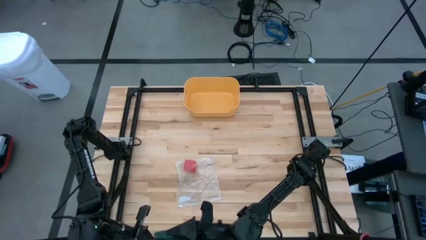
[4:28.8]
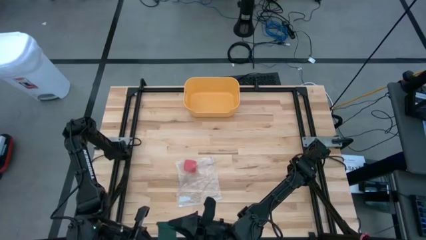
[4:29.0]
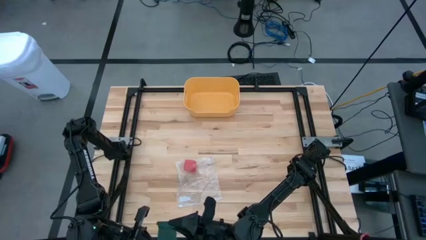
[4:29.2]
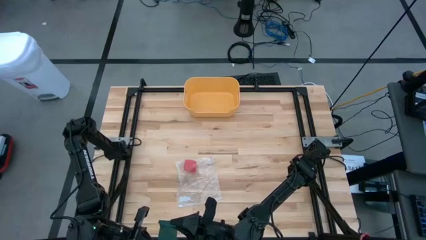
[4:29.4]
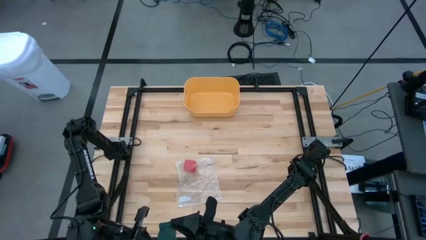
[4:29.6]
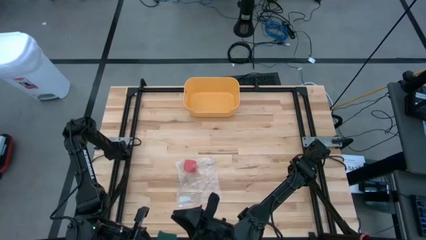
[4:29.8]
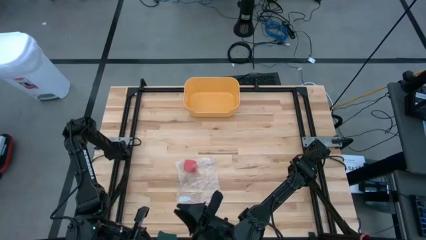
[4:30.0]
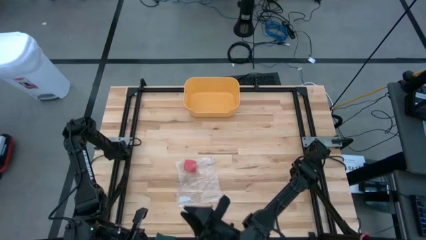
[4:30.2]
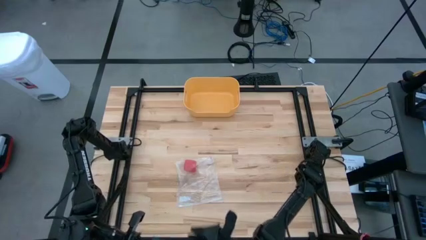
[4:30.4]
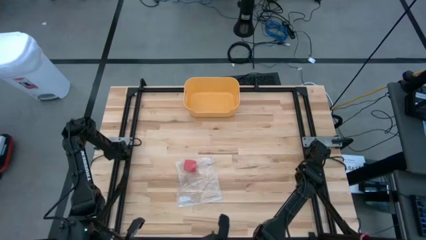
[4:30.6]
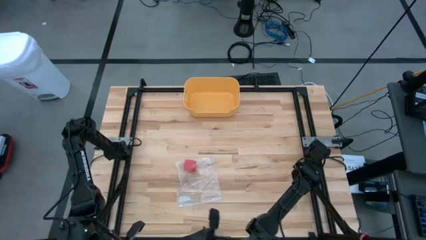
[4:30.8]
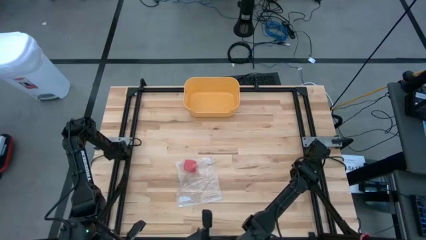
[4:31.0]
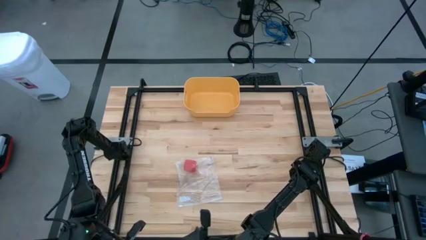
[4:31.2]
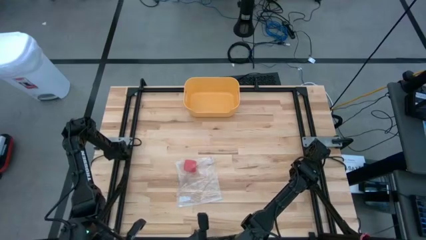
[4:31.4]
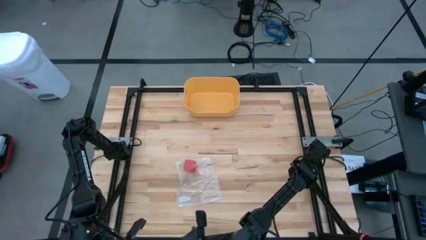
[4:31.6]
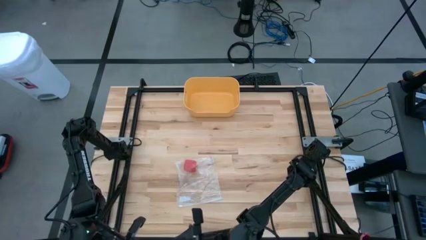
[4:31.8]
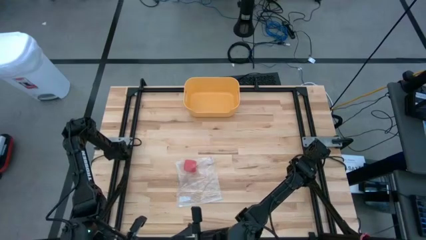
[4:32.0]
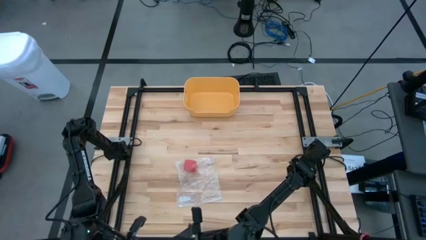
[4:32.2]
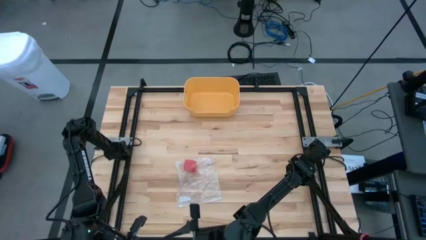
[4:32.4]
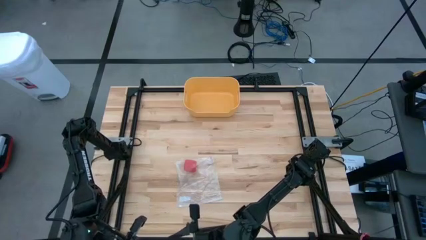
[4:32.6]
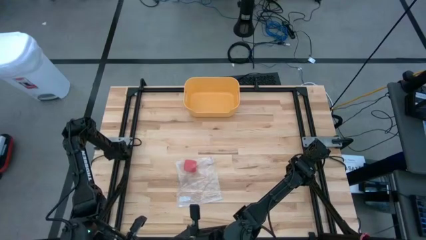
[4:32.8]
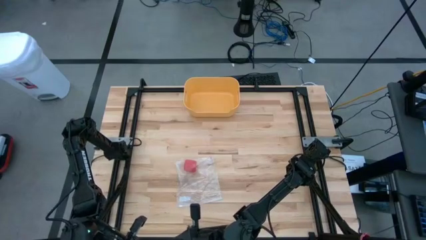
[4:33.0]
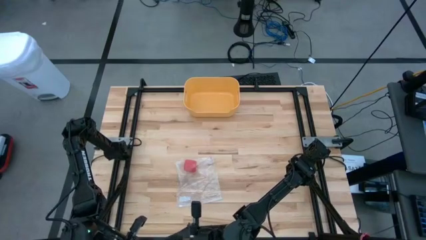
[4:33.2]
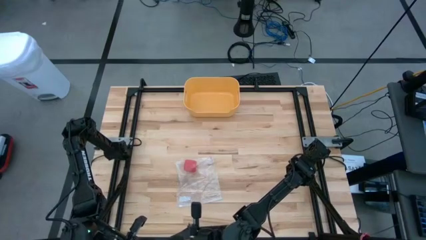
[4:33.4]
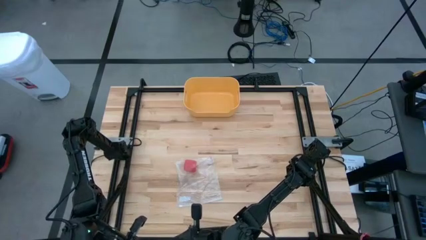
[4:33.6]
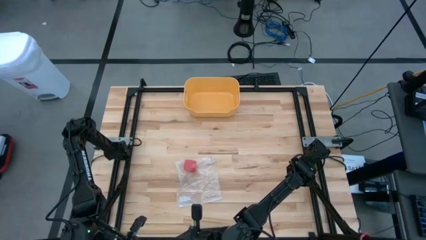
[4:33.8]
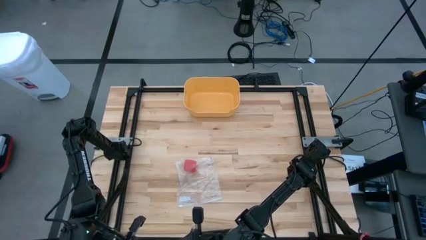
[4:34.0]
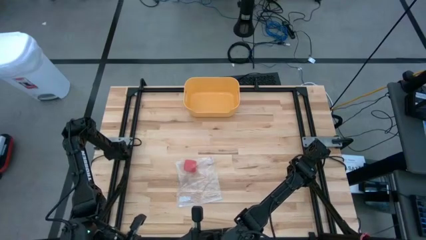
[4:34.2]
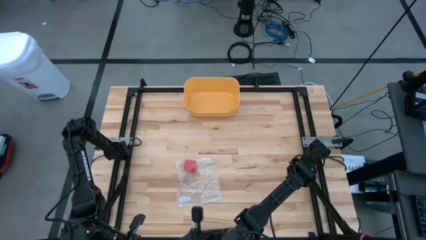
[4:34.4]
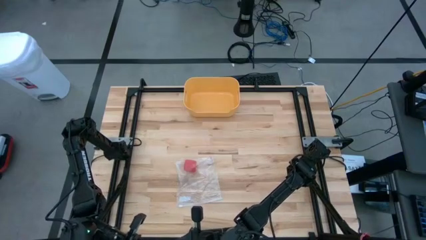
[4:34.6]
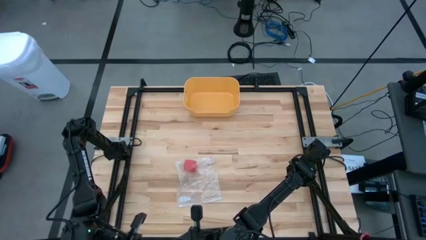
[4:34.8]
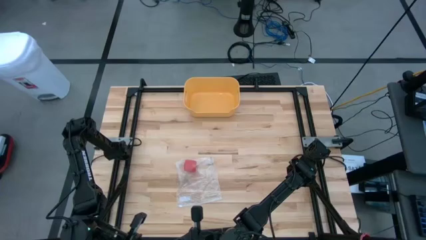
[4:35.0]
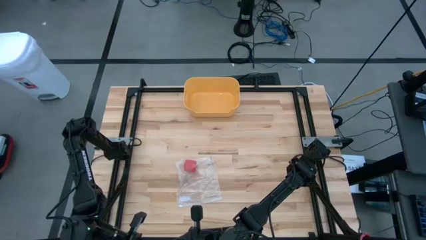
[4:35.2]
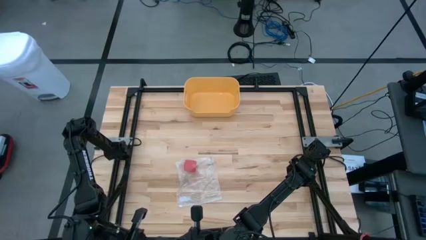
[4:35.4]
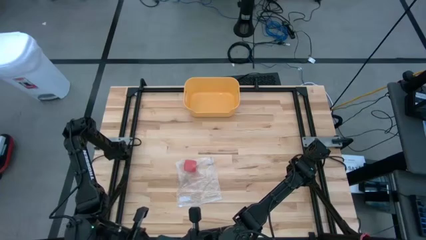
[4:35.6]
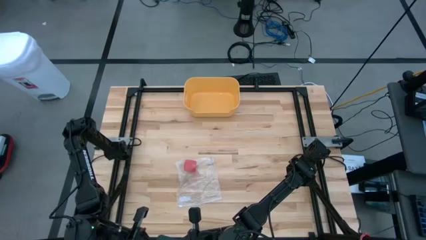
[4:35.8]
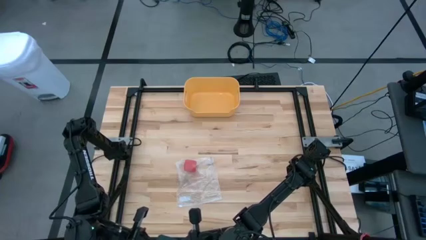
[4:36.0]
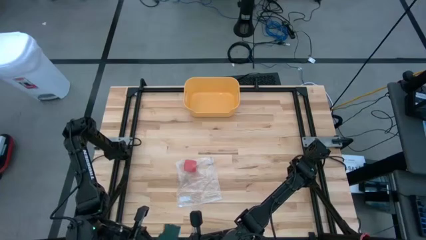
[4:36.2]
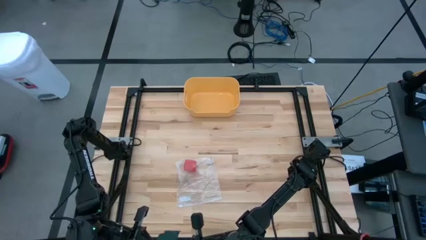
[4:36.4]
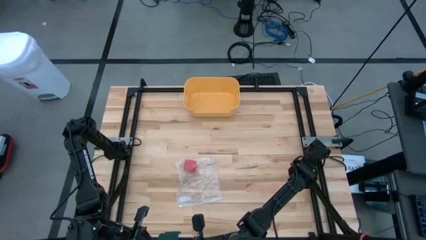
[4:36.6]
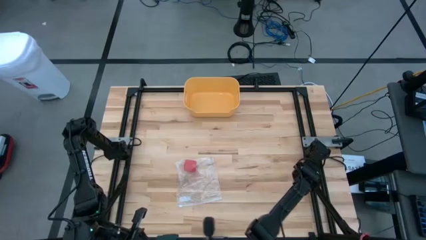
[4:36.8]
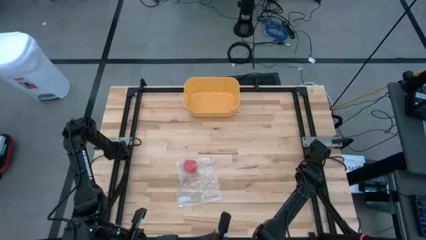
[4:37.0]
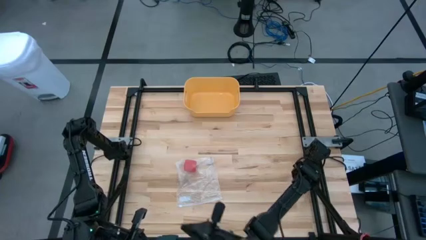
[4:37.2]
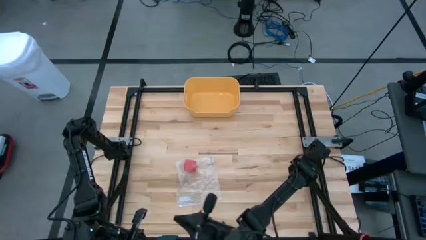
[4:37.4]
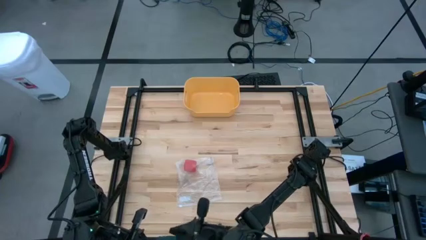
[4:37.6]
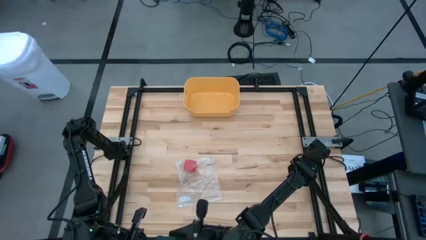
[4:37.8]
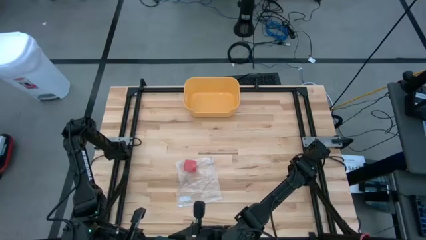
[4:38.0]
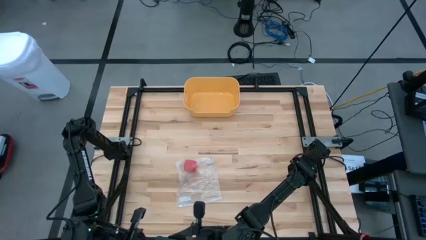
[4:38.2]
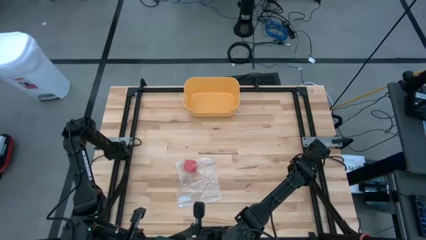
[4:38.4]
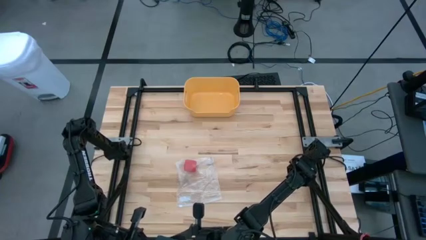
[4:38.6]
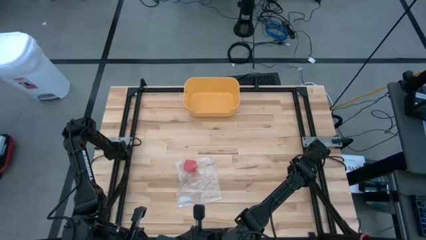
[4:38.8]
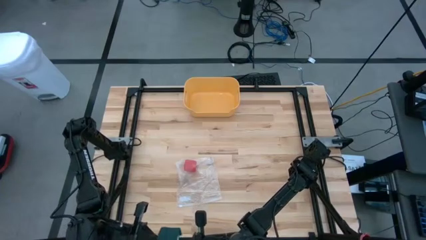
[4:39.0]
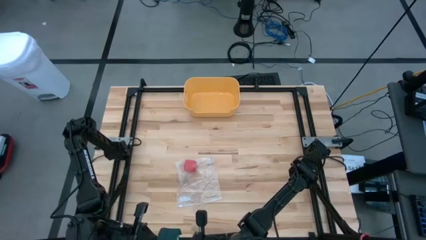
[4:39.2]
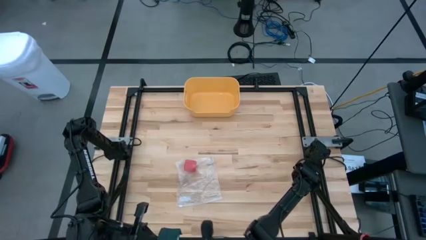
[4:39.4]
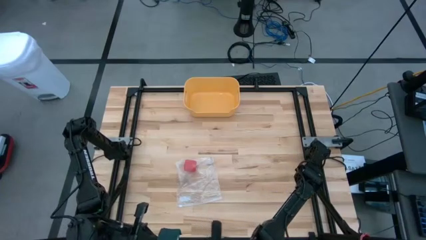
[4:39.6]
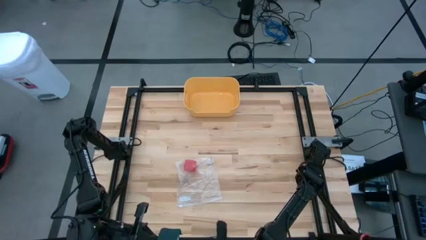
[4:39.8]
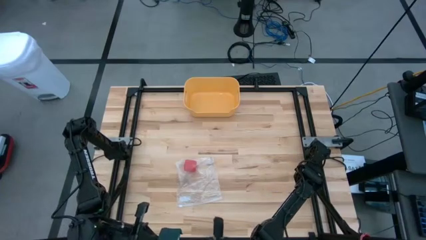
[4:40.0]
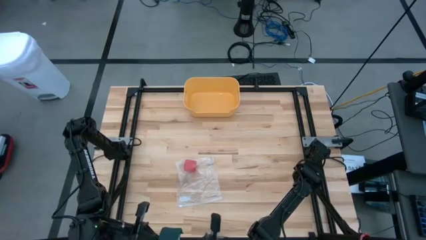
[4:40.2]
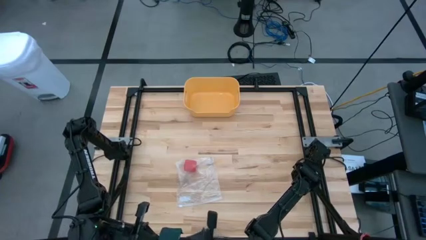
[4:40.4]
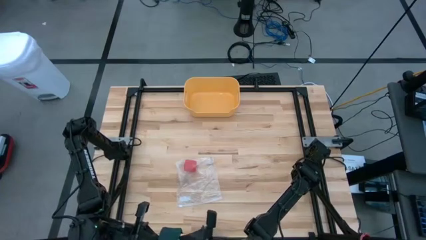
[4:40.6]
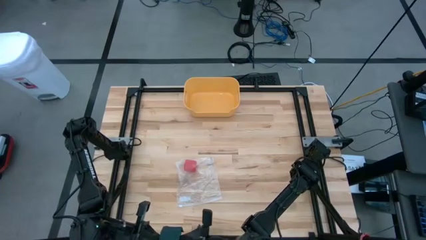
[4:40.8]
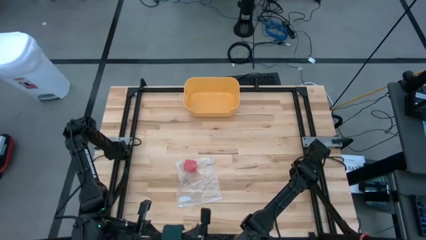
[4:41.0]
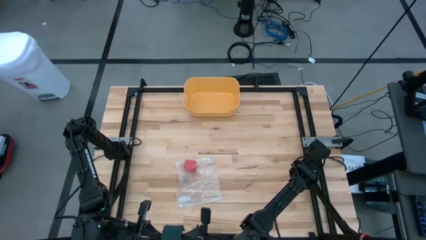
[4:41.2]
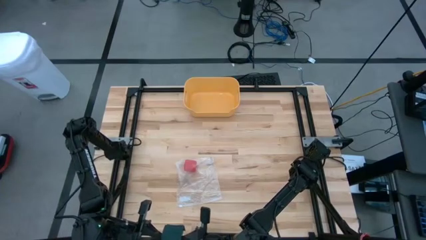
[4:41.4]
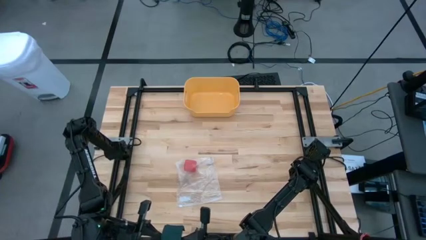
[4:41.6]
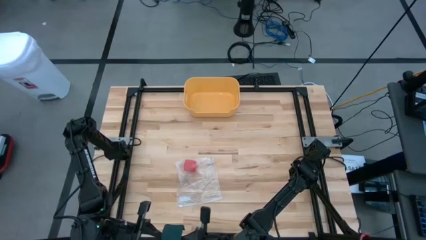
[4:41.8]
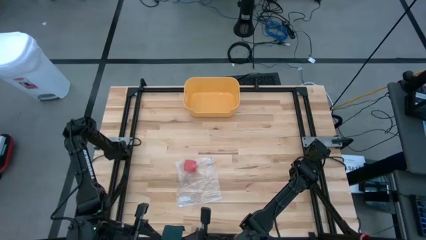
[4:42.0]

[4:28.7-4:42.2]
Task: Roll bandage
Roll the green bandage

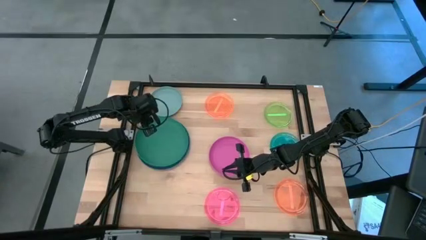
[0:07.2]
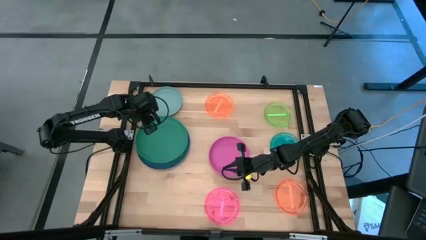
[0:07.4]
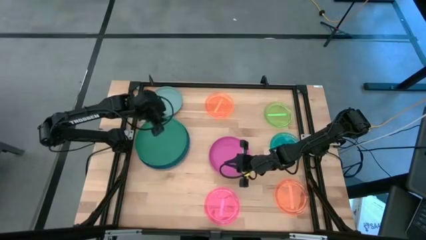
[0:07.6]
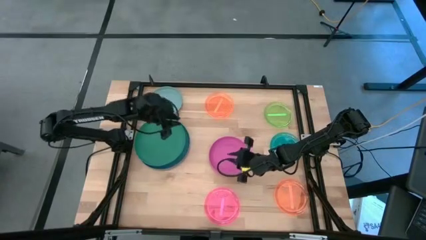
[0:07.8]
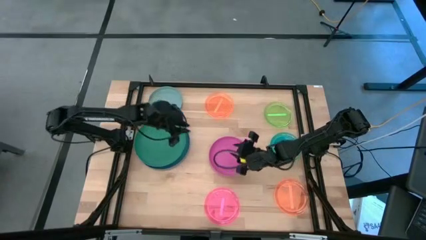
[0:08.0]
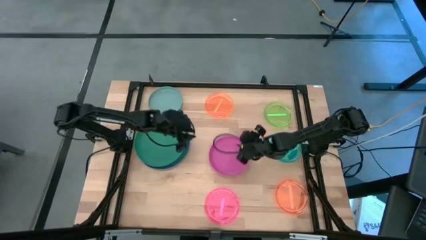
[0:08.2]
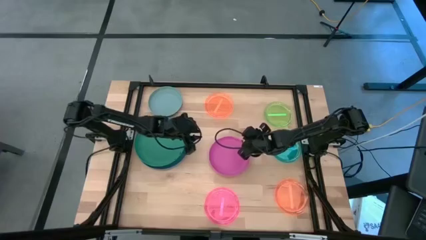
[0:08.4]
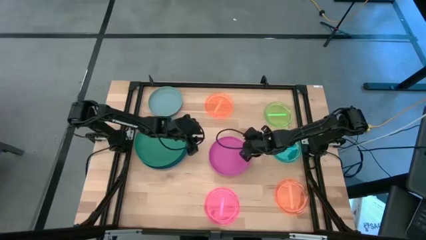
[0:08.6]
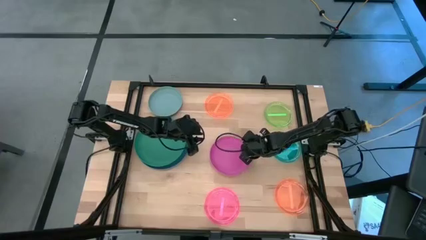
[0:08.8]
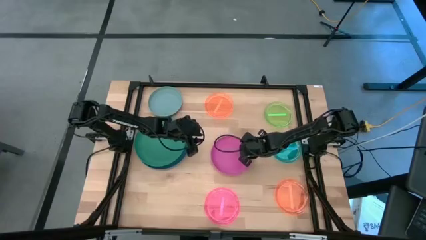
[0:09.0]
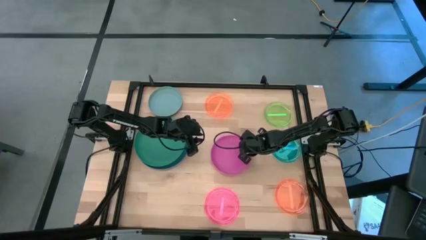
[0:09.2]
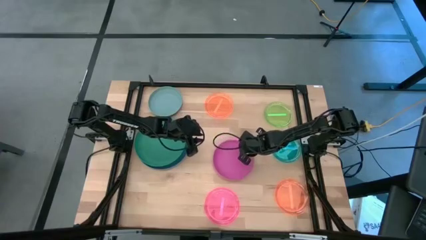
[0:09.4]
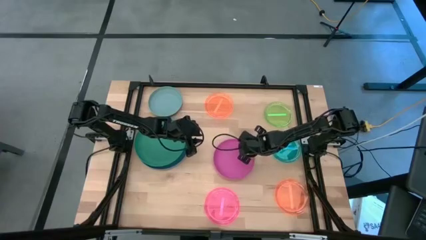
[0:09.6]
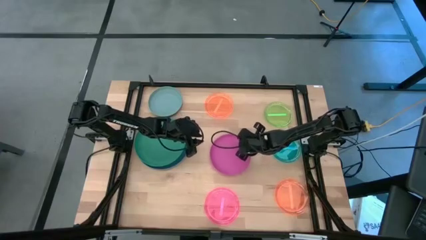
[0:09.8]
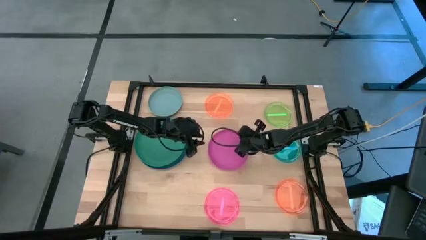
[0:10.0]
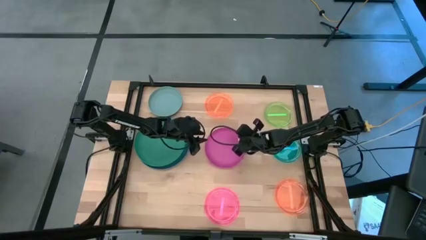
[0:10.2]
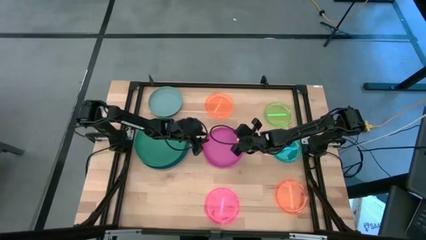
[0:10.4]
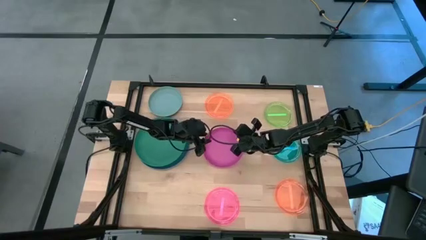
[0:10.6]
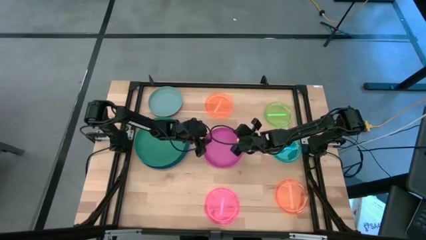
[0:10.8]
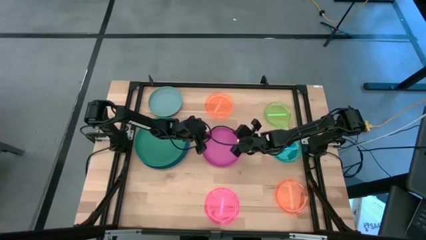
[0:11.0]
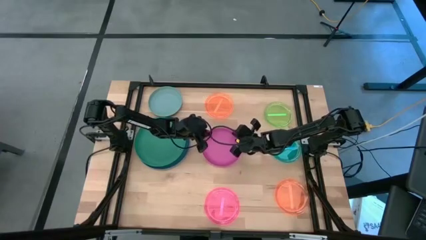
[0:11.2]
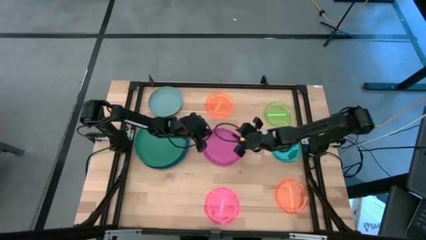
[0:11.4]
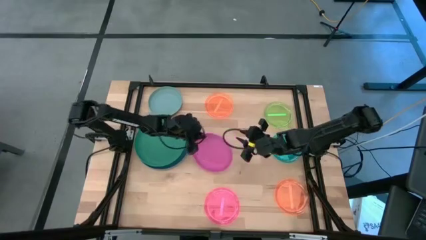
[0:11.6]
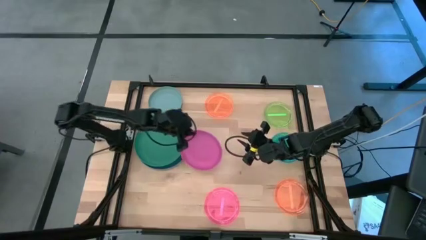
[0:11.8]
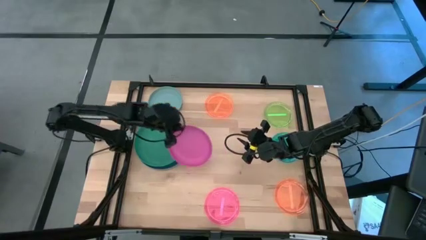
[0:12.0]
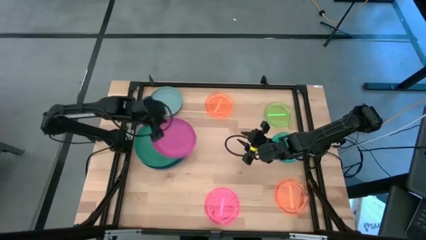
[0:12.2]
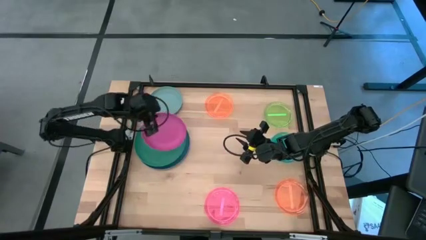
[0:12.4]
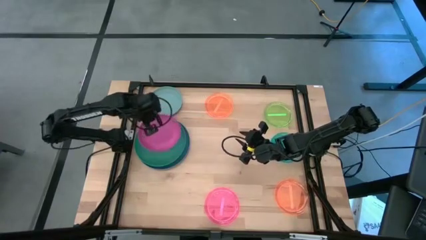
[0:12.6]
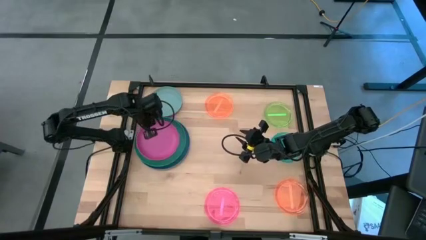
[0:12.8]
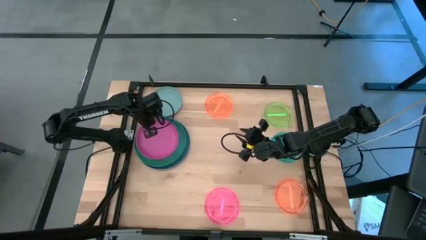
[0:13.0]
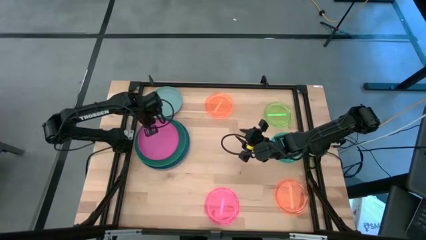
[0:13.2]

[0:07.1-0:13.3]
Task: Stack plastic plates
Stack the medium pink plate on top of the big green plate
